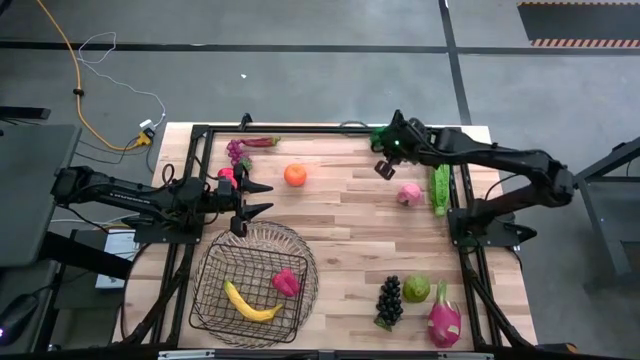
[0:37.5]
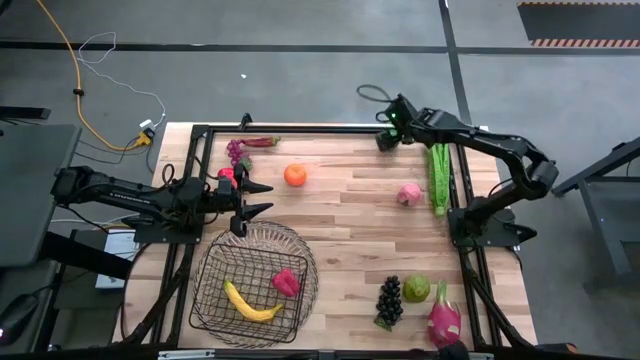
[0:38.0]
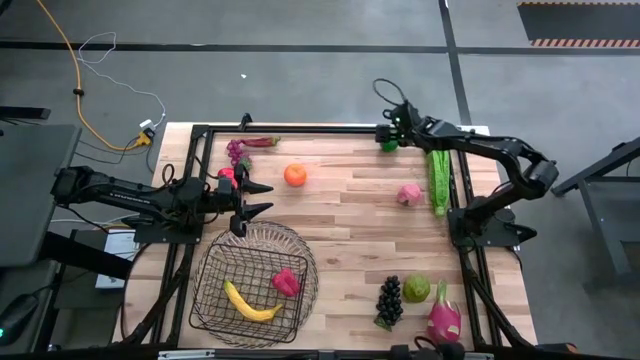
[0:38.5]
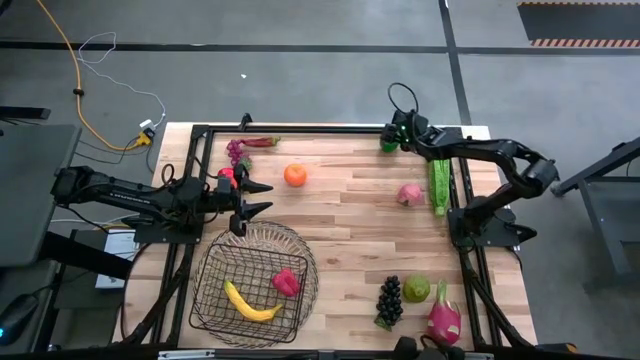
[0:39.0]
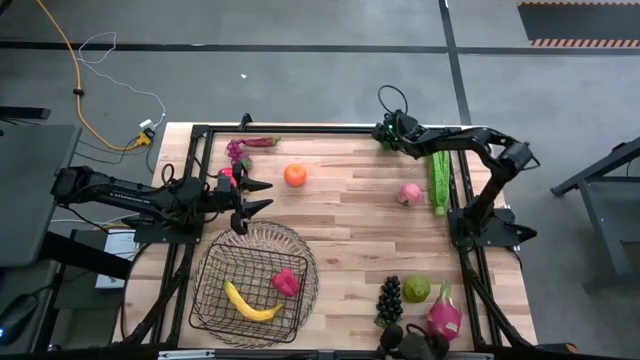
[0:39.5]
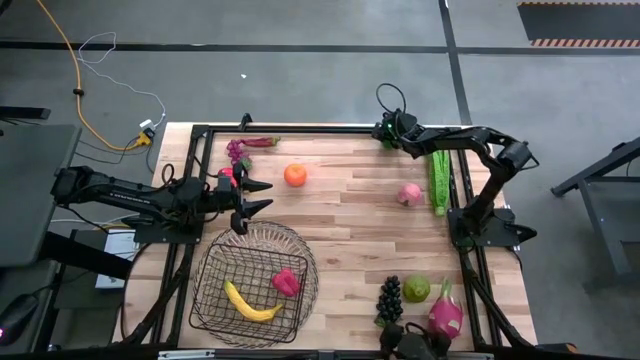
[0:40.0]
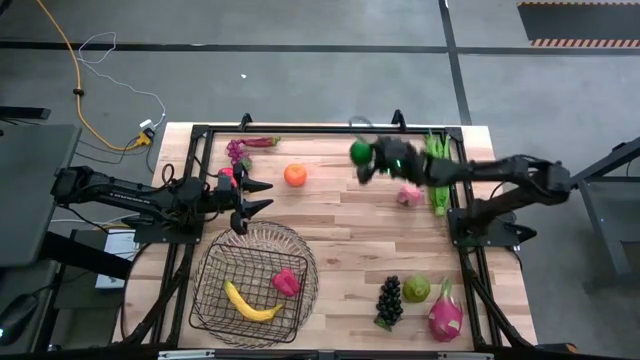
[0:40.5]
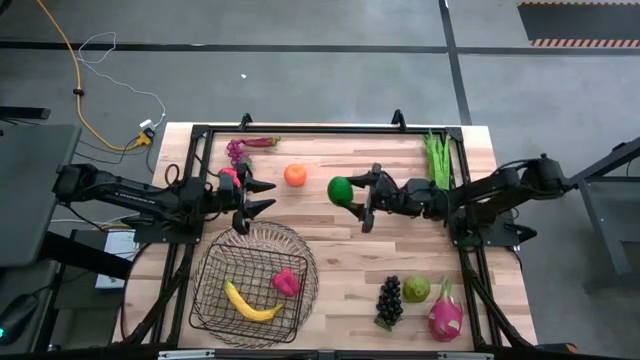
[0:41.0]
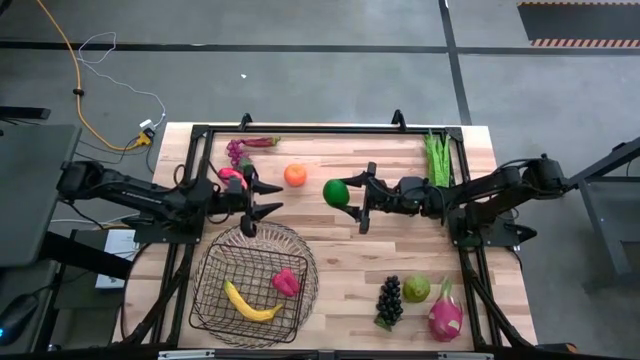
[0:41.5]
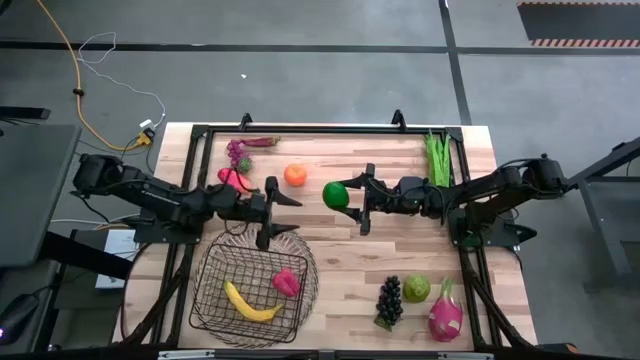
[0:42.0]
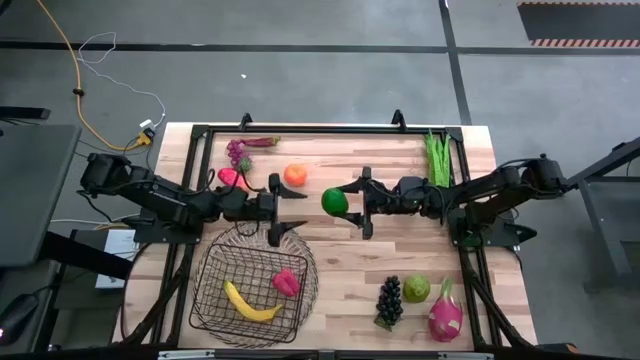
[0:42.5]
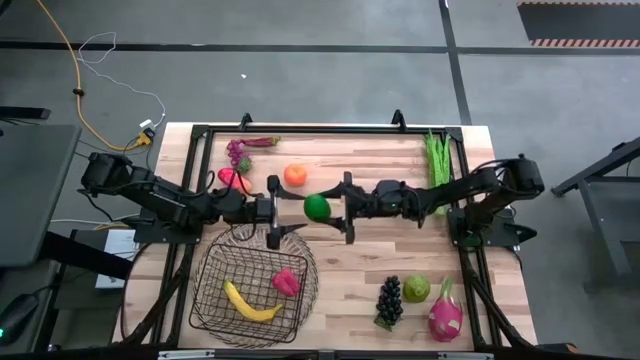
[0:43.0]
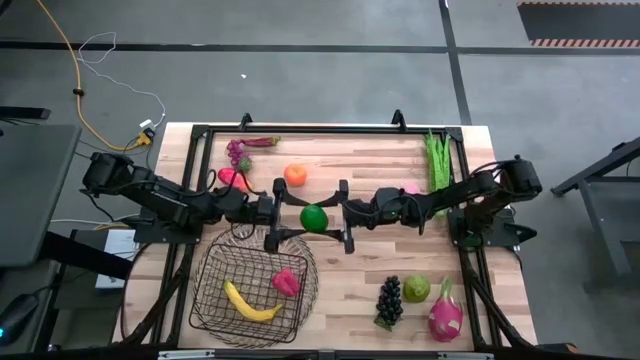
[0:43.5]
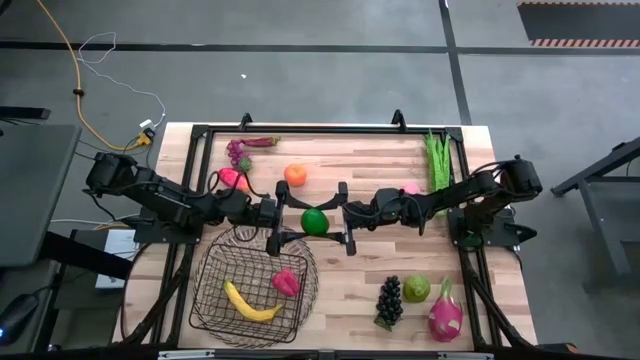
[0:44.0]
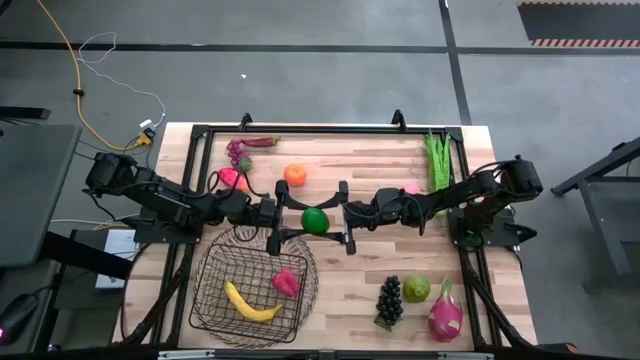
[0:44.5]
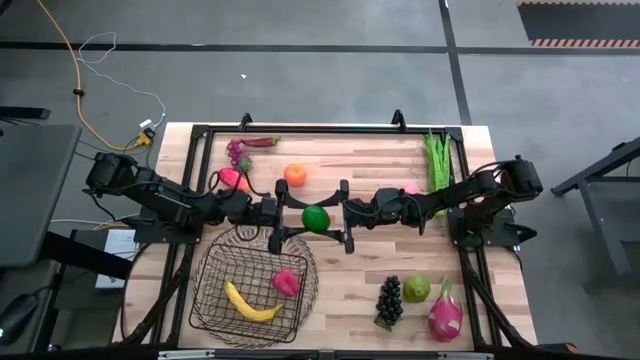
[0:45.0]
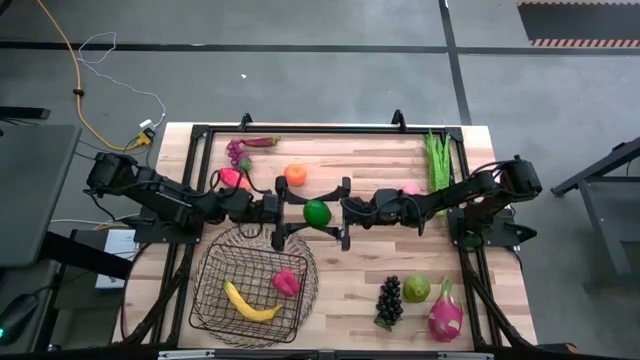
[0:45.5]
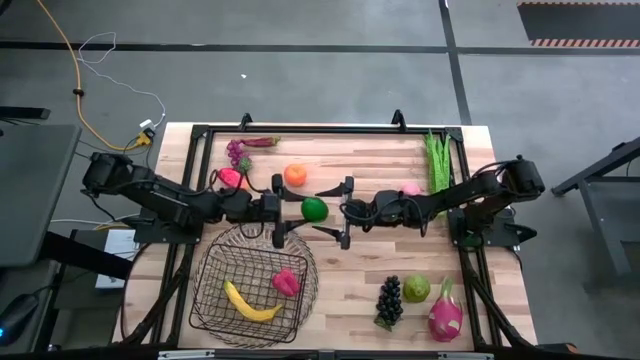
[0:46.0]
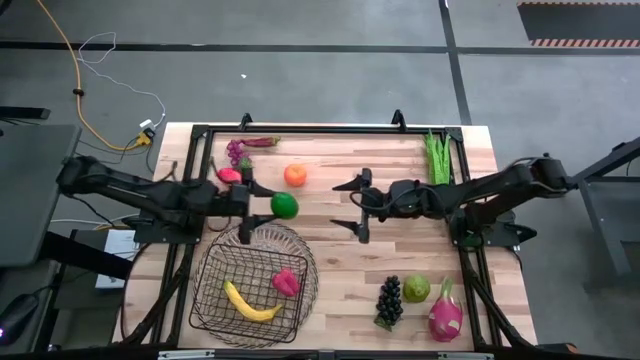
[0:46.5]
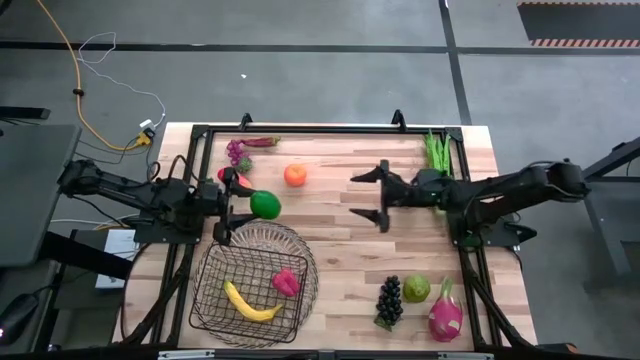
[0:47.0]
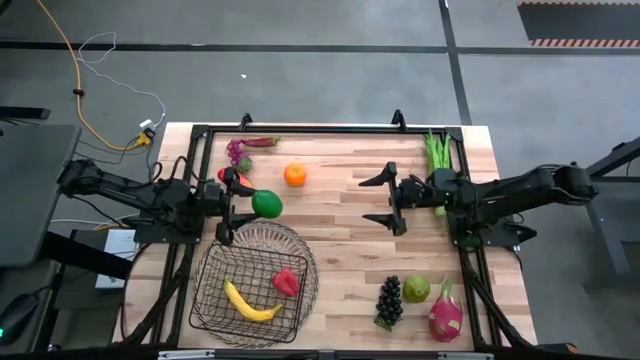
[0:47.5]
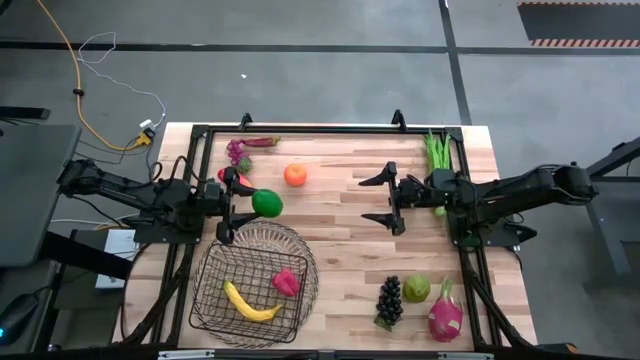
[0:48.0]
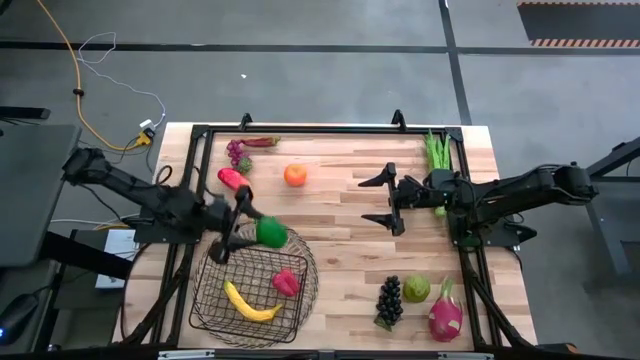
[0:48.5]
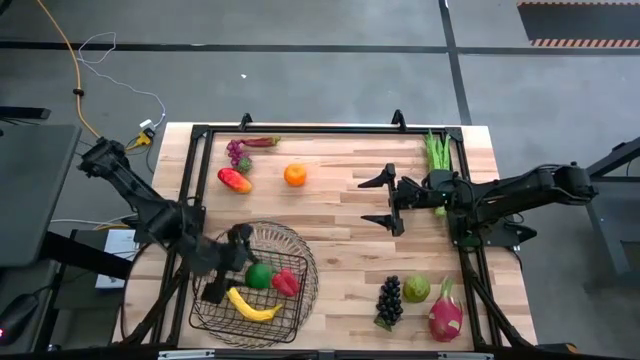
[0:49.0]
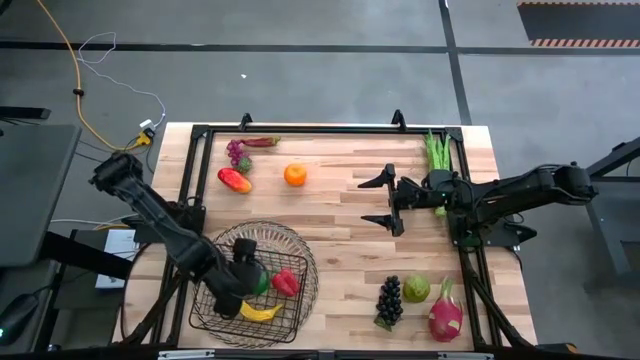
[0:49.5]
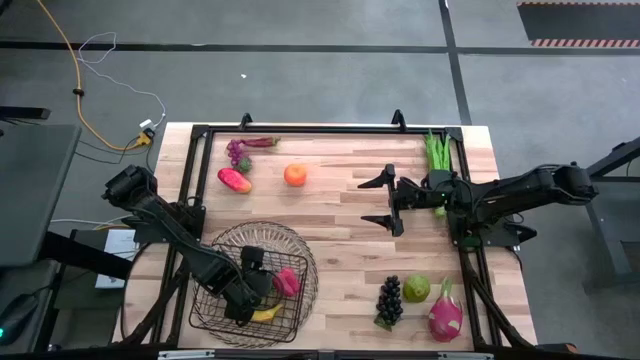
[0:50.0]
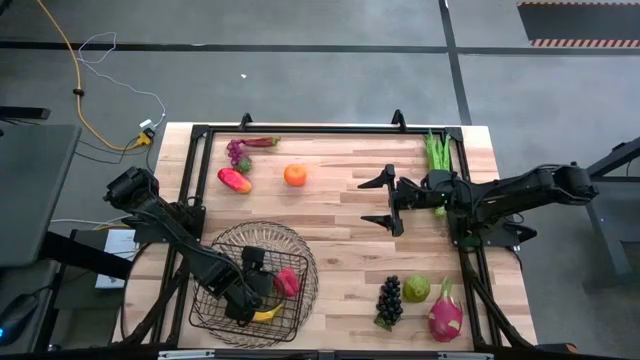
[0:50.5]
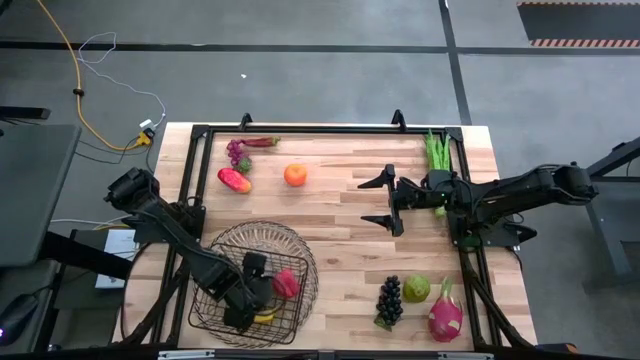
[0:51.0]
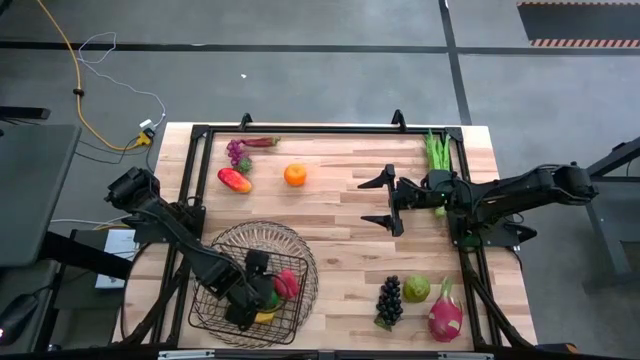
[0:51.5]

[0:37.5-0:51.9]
Task: Build produce basket
Put the green lime into the black wire basket

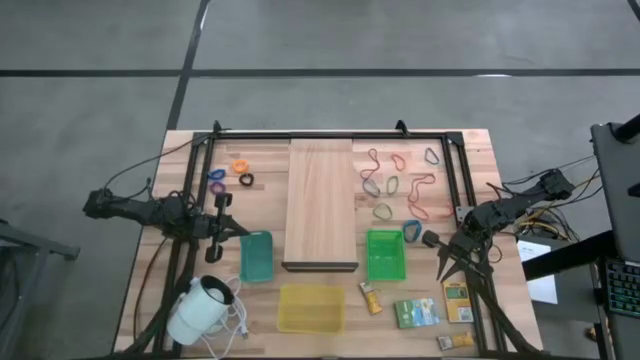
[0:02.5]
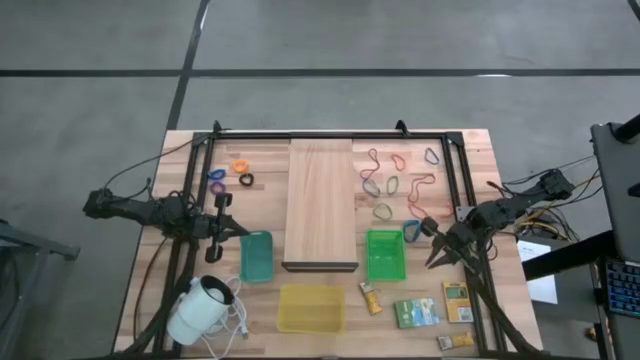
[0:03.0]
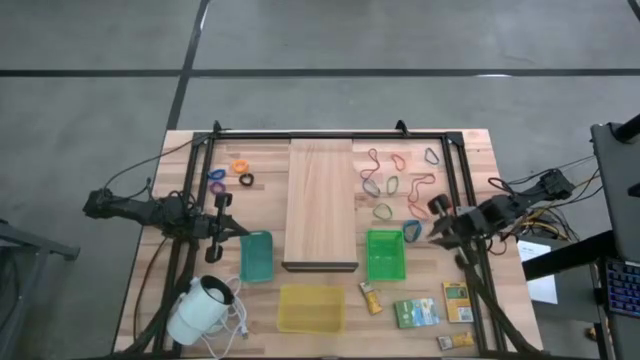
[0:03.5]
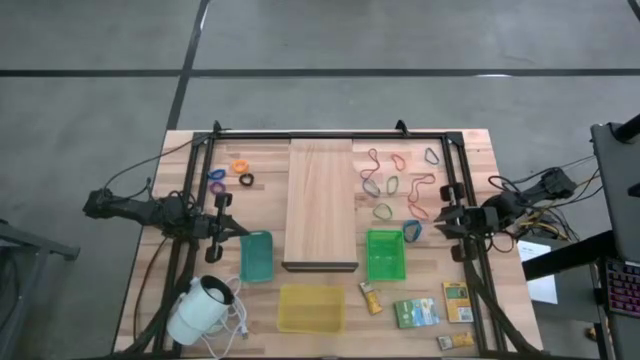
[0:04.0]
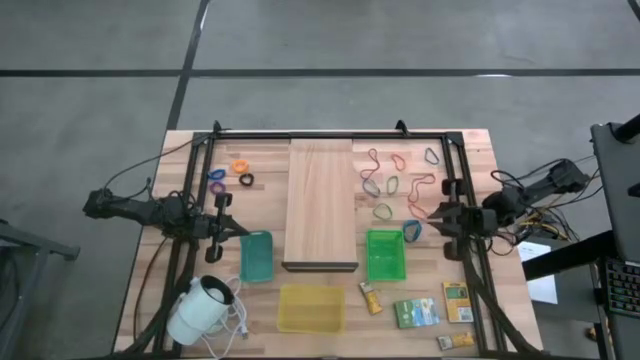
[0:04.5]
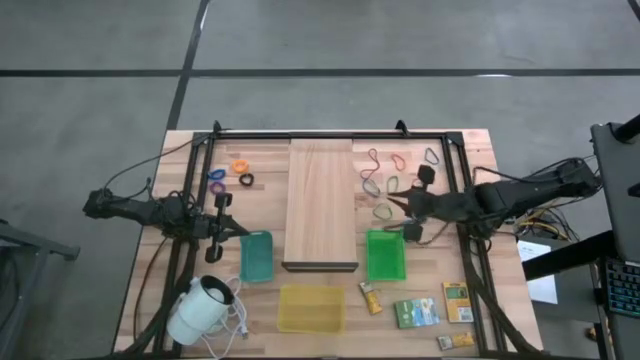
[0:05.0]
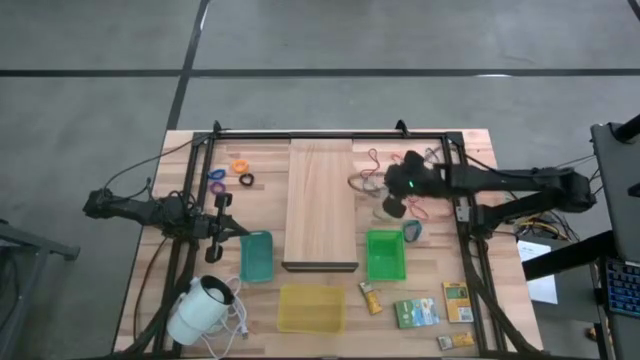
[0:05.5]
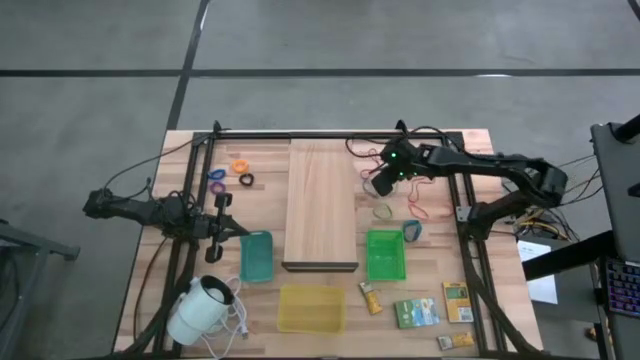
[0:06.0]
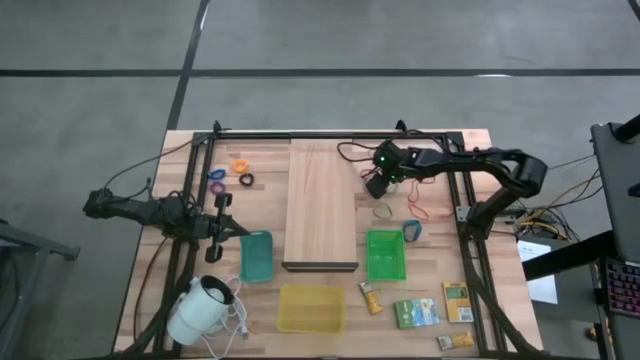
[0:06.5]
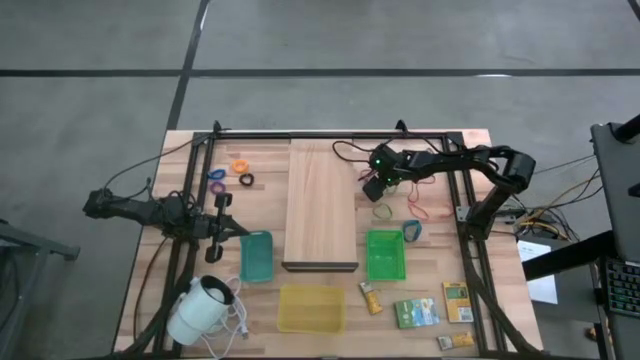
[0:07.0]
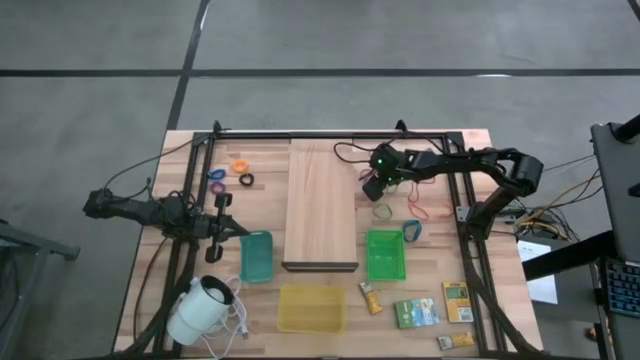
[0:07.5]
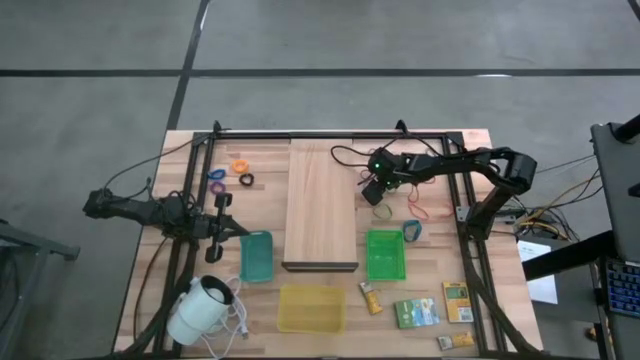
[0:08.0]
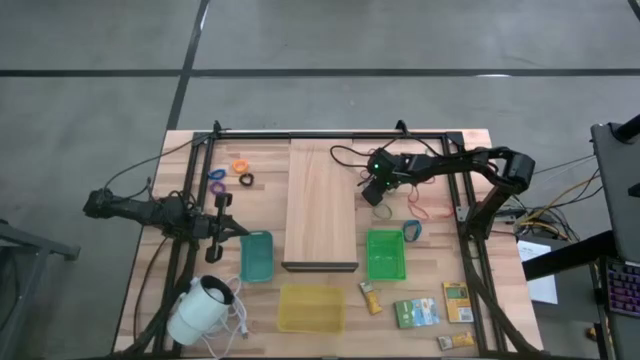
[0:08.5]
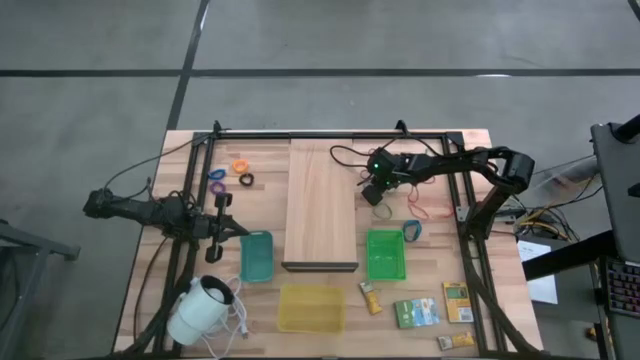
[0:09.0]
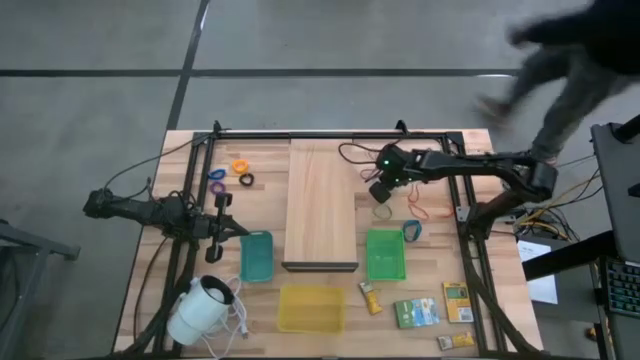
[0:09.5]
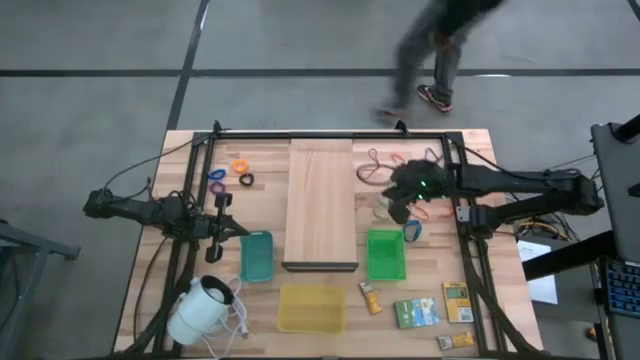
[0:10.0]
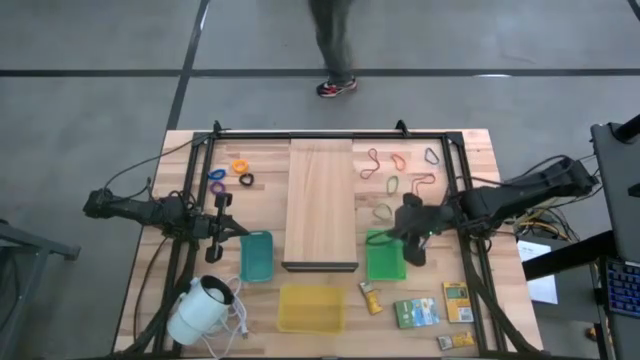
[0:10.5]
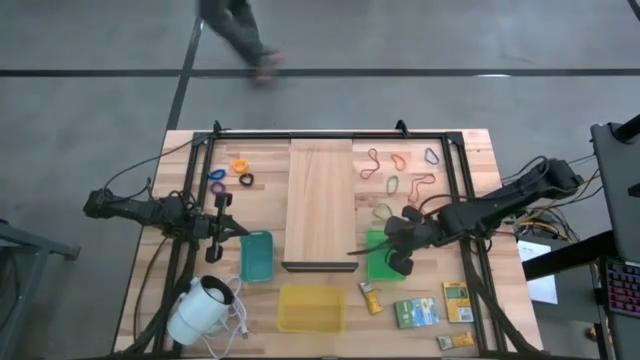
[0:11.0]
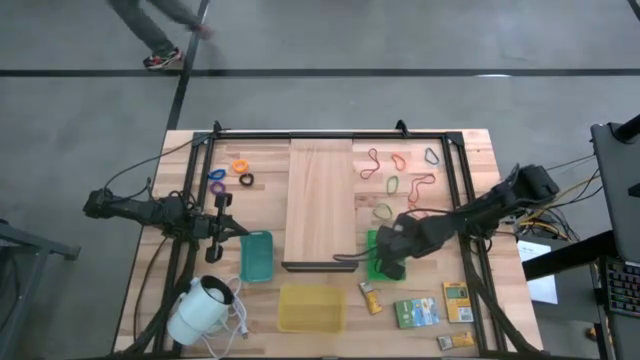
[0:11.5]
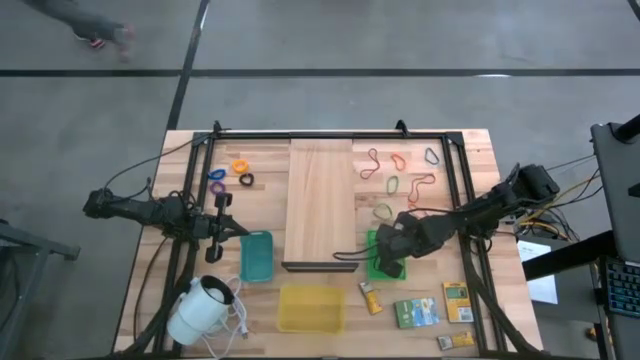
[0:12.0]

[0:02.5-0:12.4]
Task: Pick & Place Office Desk Supplies
Put the bottom blue thin rubber band into the green bin
